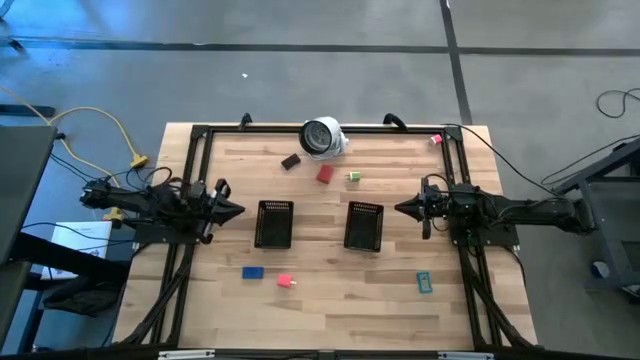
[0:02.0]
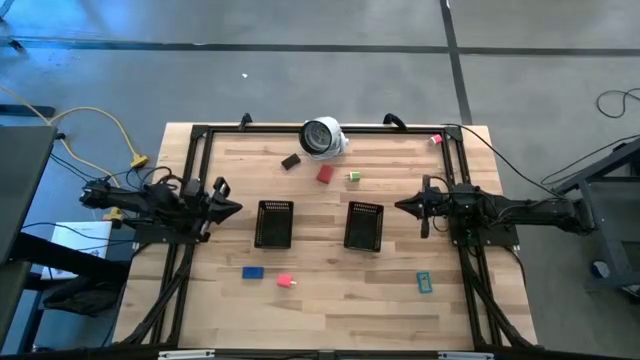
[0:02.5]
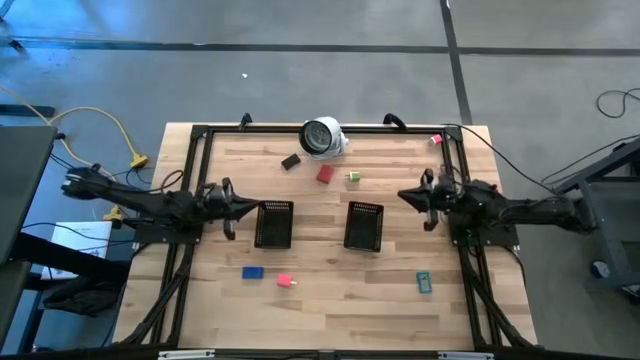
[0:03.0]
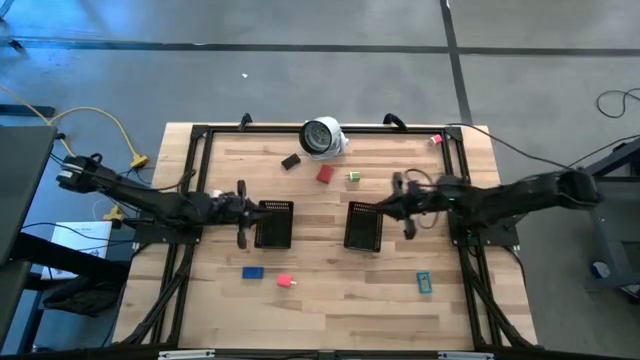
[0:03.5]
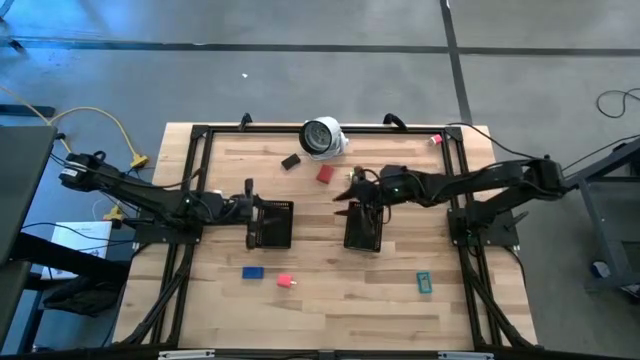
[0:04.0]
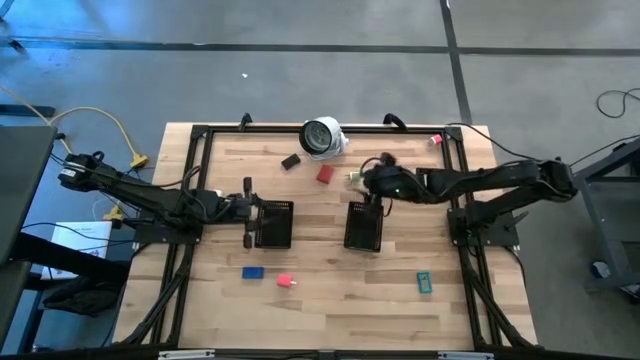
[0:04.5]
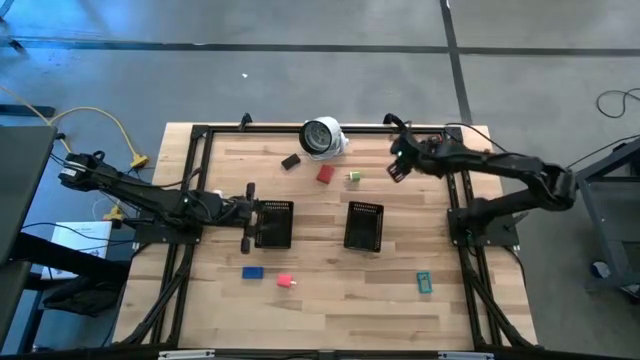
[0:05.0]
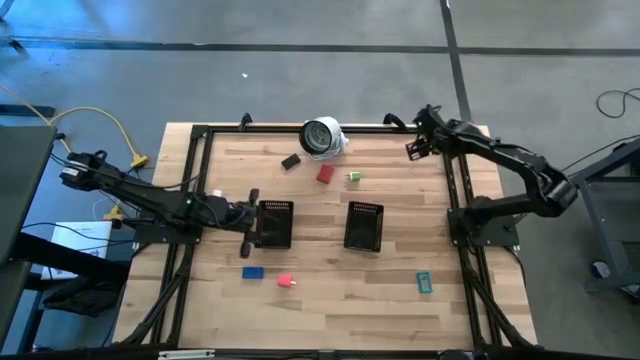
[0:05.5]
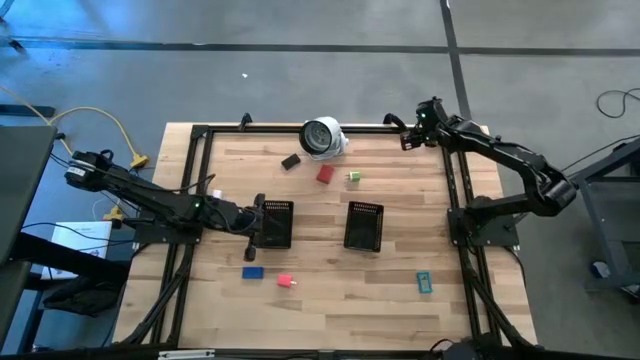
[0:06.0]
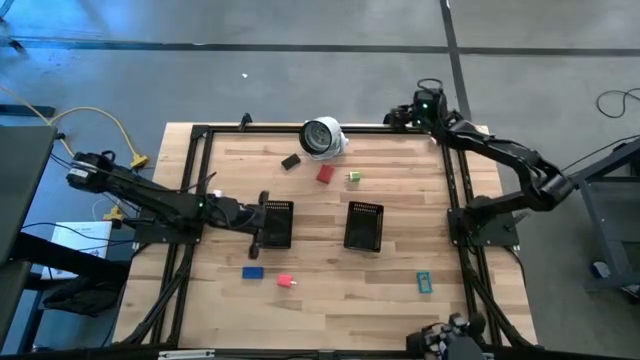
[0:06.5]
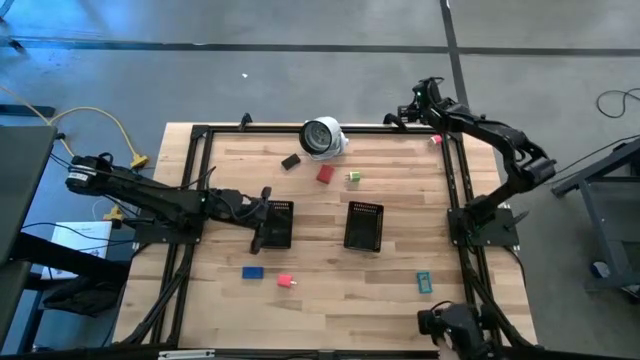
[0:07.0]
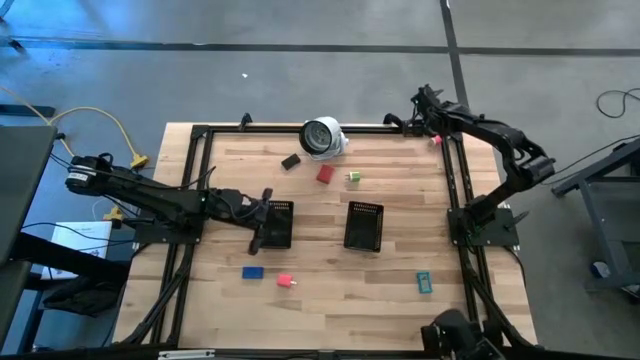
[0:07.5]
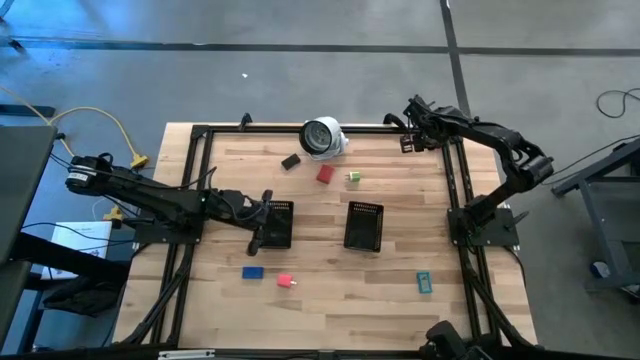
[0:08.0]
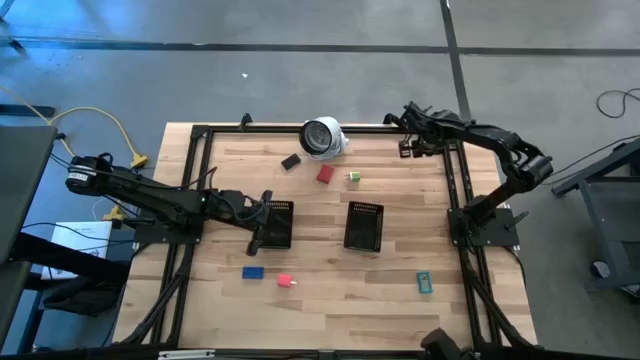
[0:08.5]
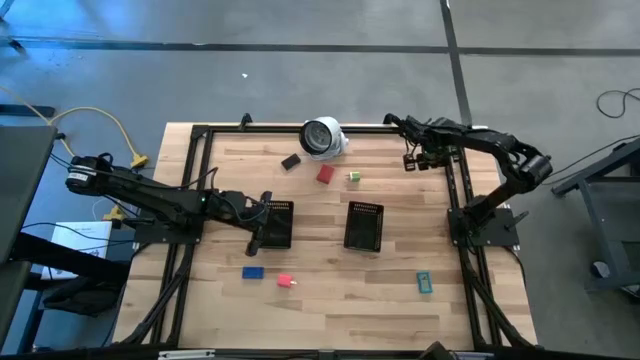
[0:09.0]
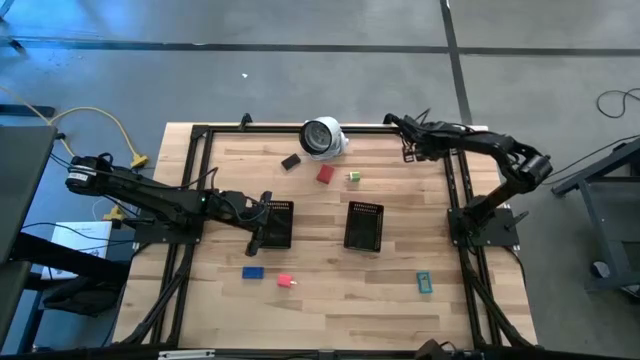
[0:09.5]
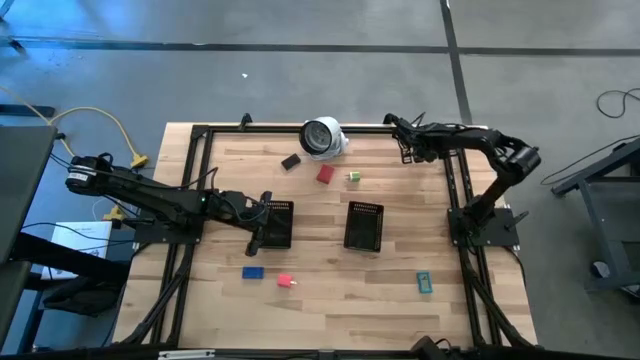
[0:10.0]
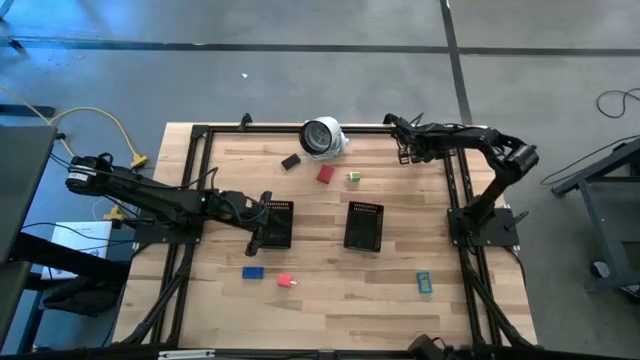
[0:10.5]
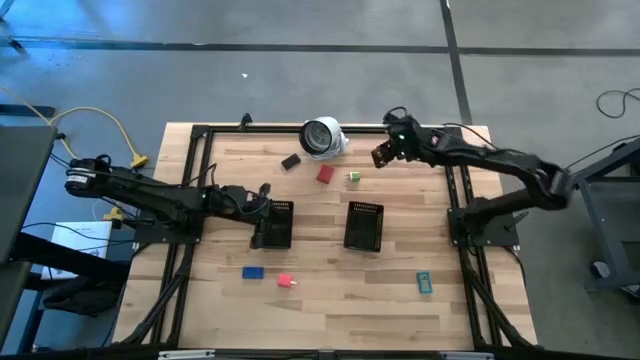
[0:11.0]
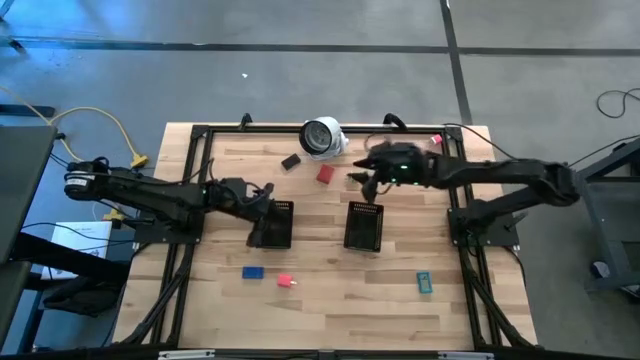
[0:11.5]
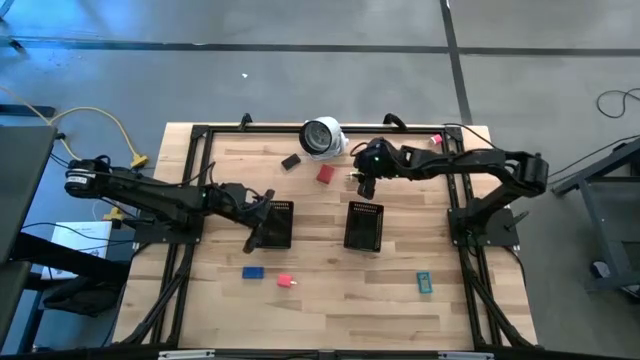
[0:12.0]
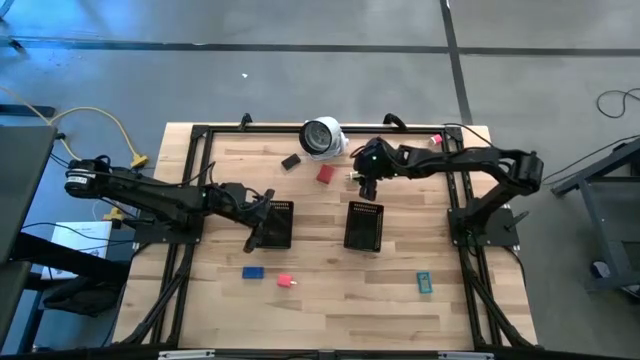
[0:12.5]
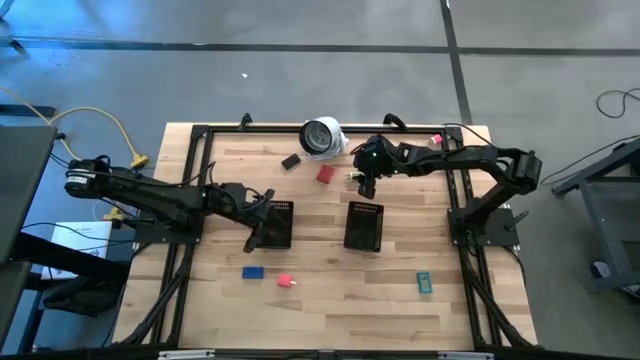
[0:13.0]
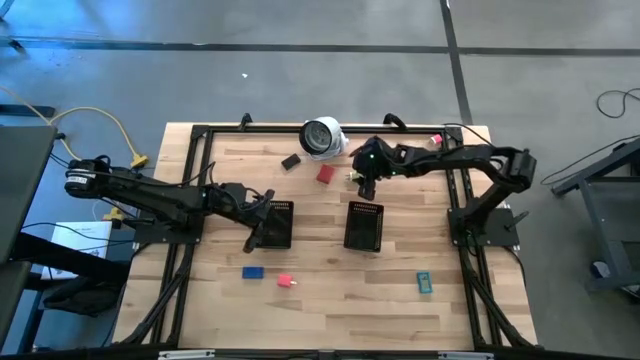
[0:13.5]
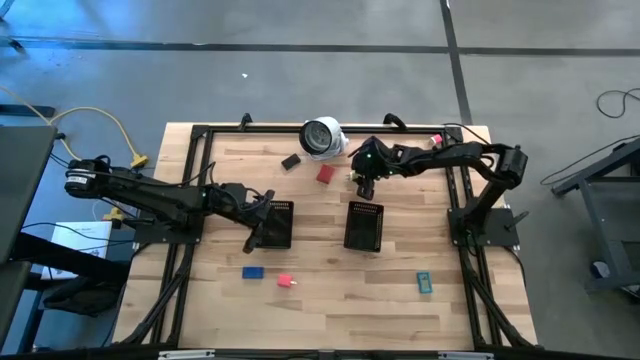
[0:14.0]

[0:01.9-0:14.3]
Task: Pick & Place Office items
Put the green charger adapter into the left black bin

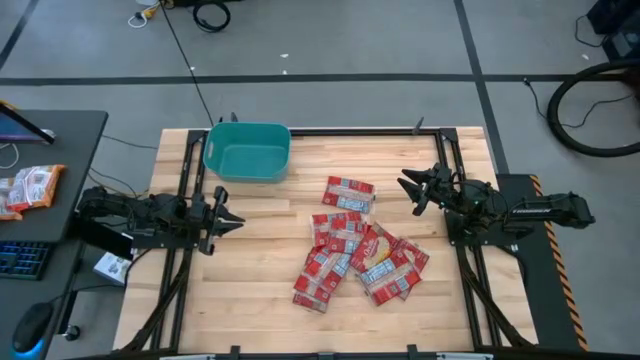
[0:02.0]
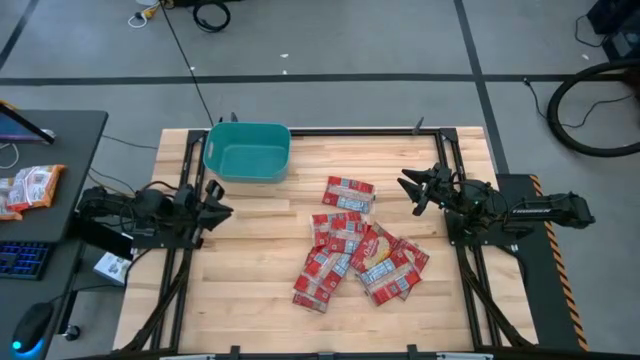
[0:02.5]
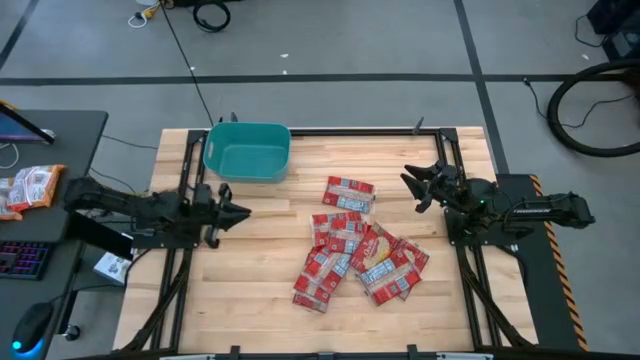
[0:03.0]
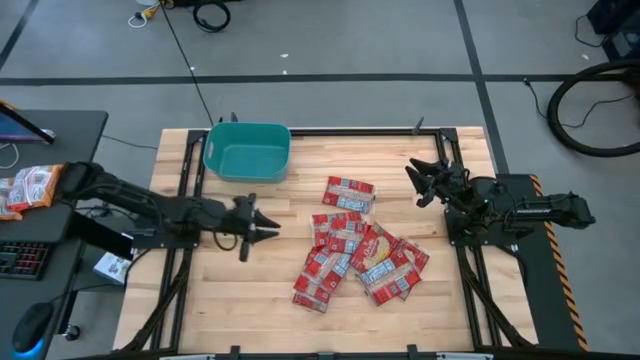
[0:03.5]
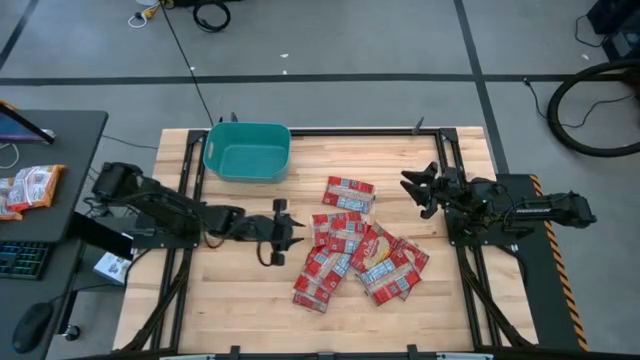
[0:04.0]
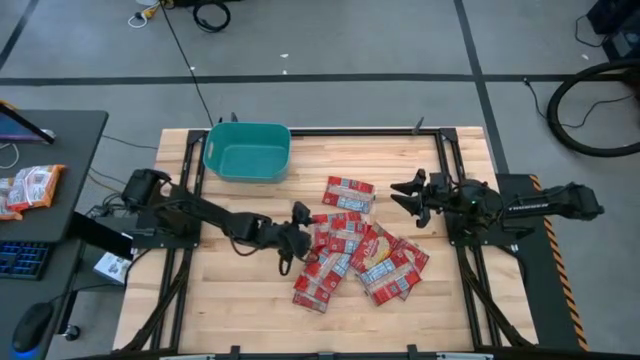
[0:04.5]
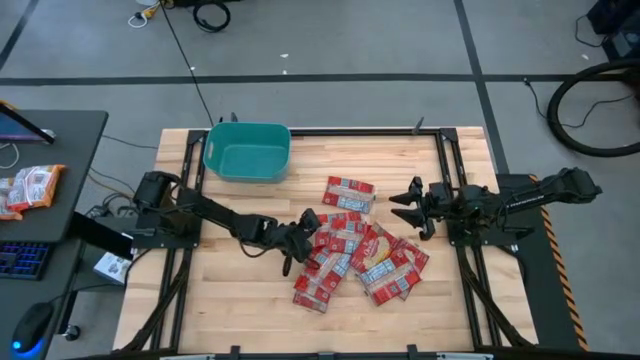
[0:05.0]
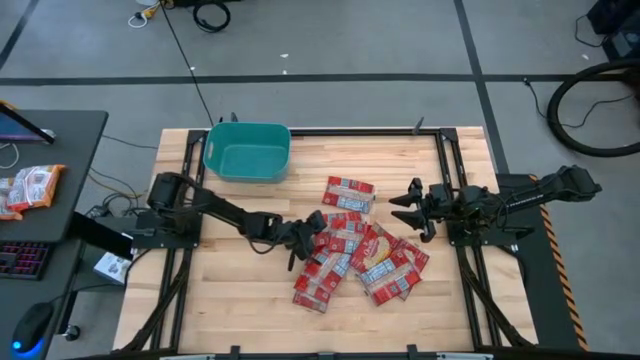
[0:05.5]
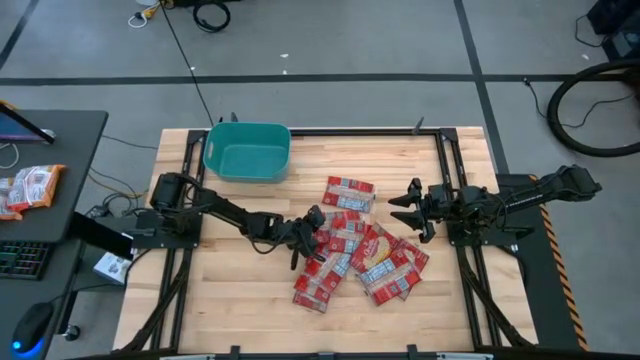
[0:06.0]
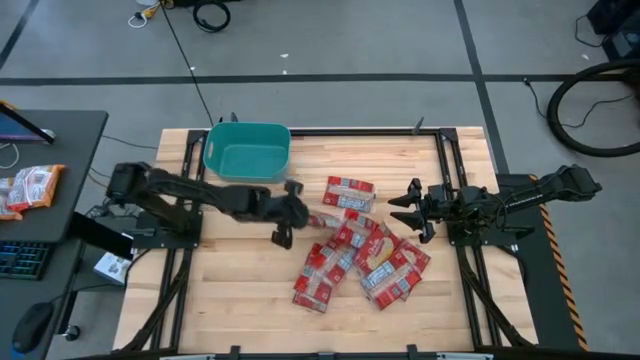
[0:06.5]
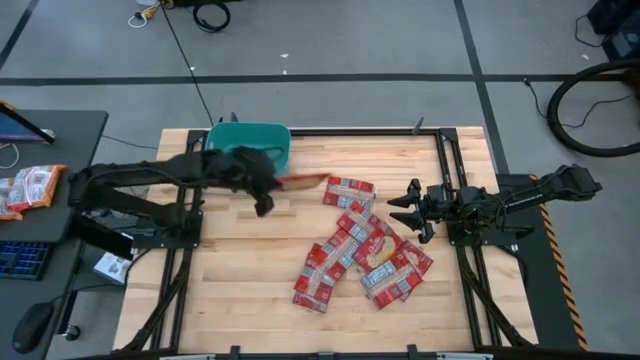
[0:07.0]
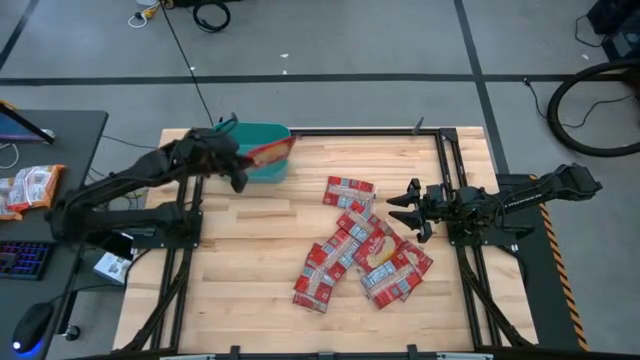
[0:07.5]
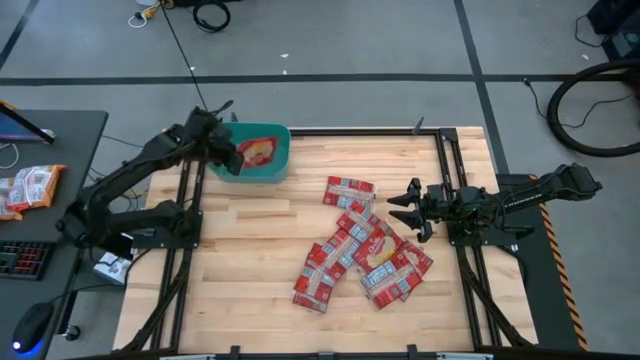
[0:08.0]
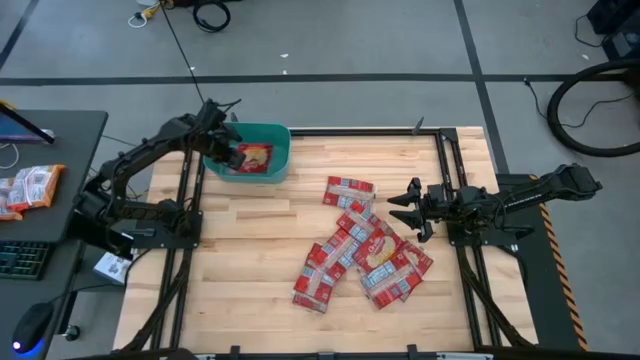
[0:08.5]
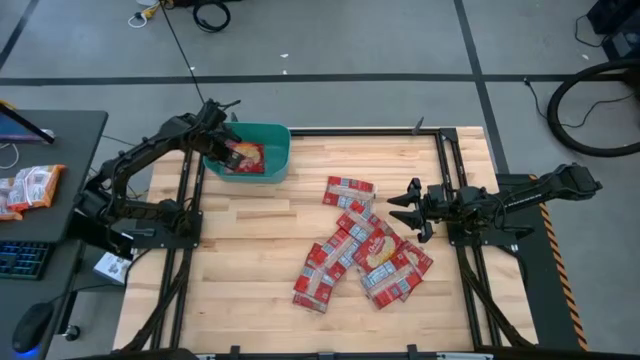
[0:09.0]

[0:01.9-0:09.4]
Task: Sort popcorn bags into baskets
Put the popcorn sachet into the bin
